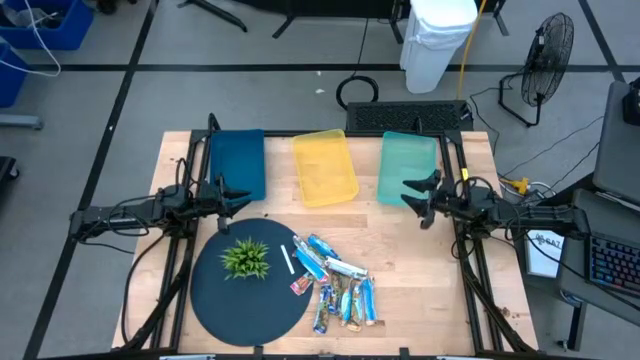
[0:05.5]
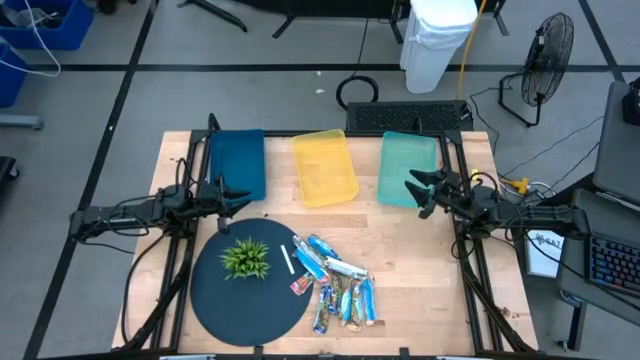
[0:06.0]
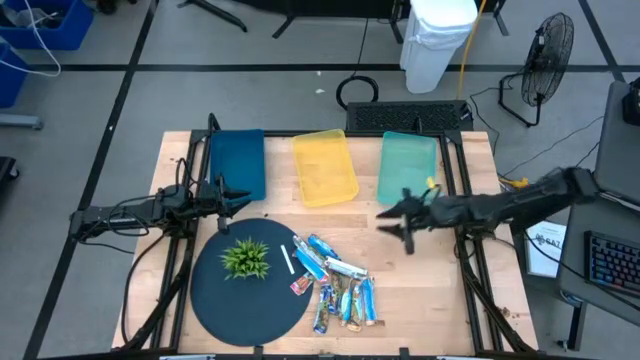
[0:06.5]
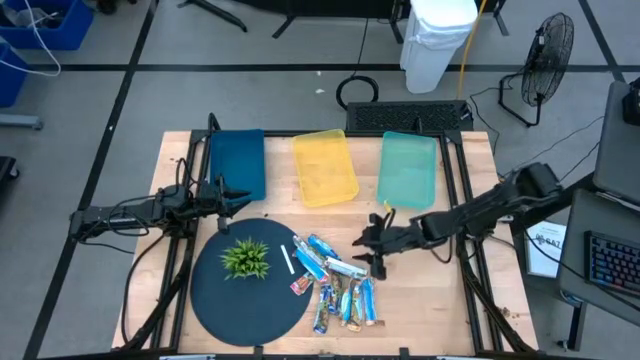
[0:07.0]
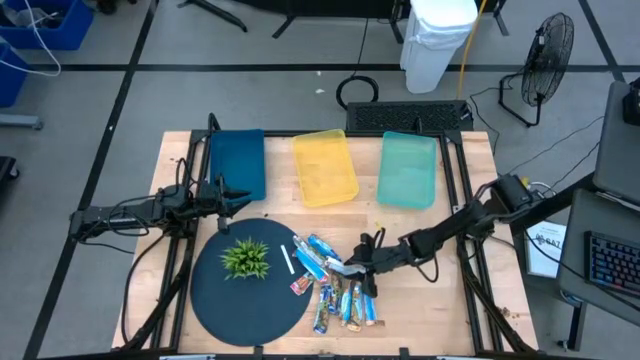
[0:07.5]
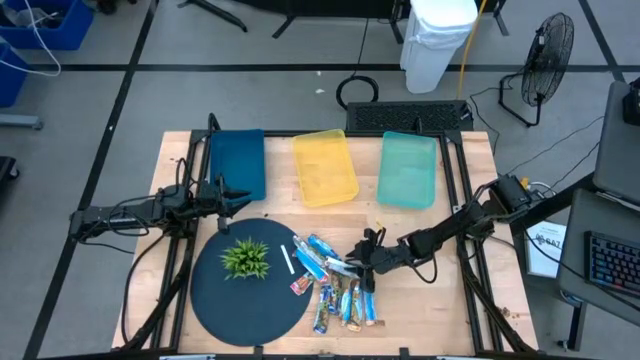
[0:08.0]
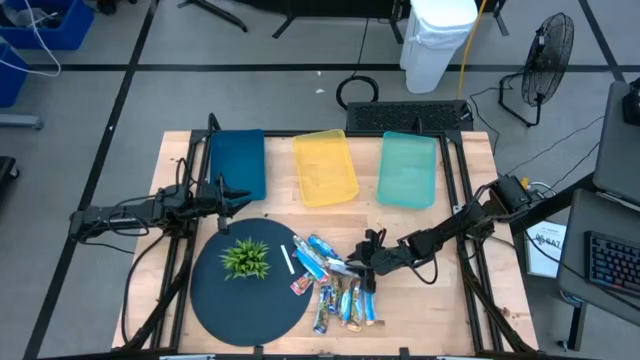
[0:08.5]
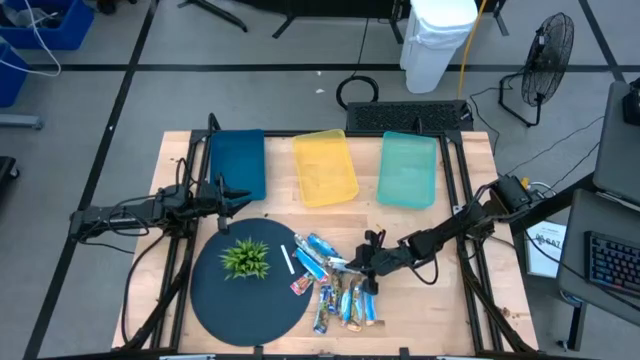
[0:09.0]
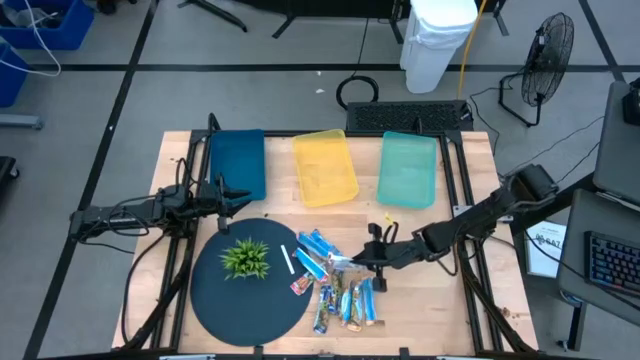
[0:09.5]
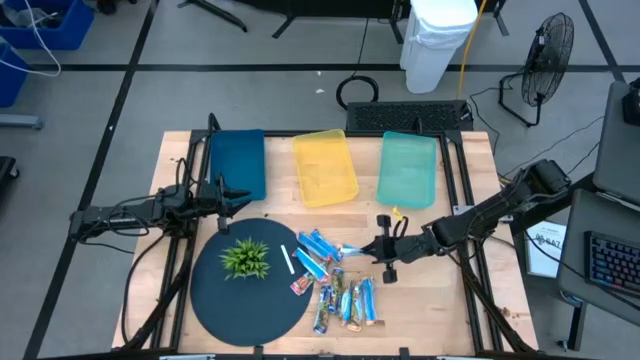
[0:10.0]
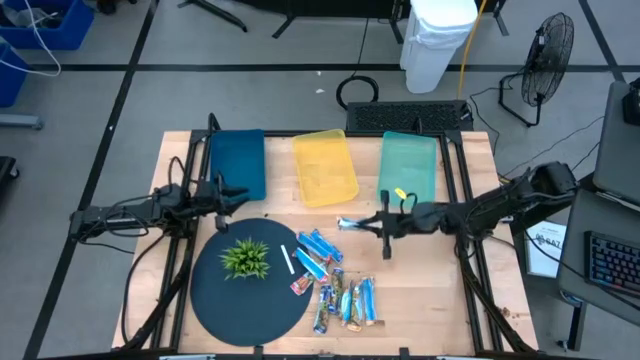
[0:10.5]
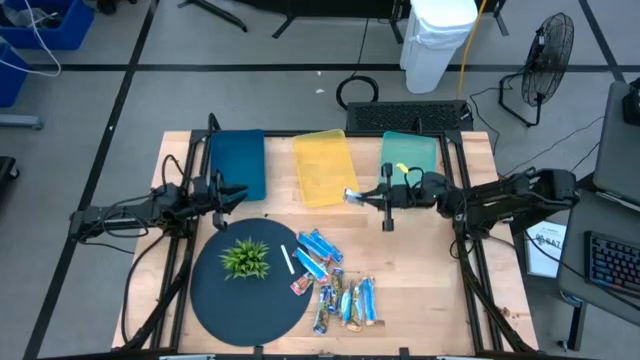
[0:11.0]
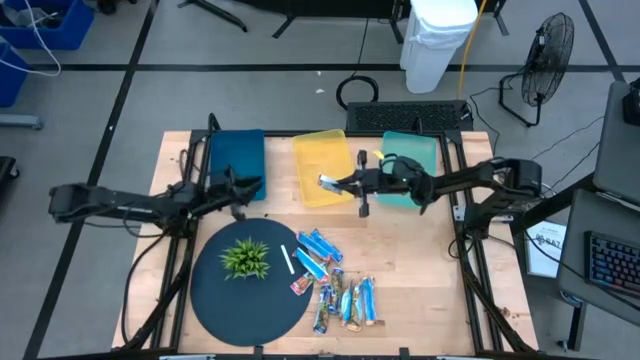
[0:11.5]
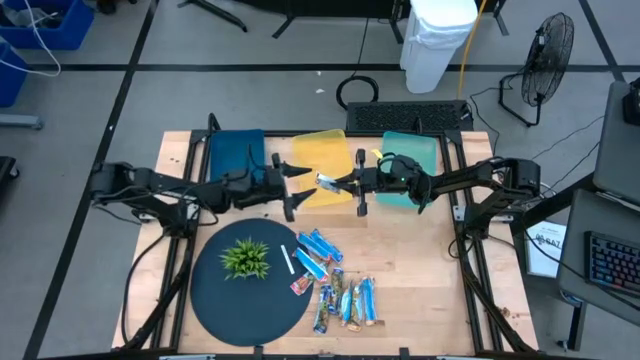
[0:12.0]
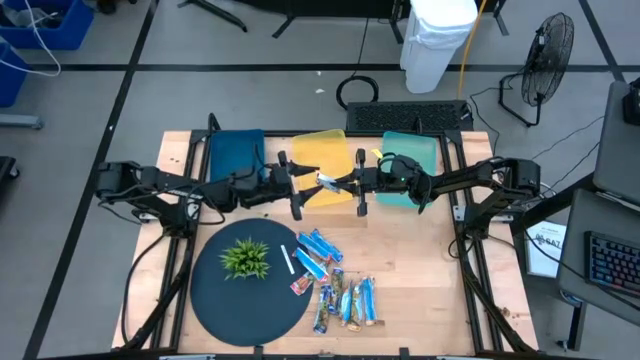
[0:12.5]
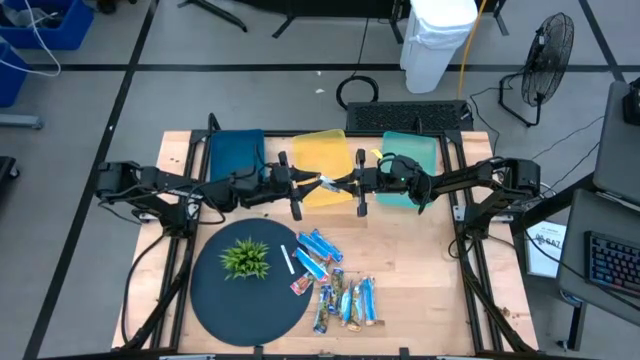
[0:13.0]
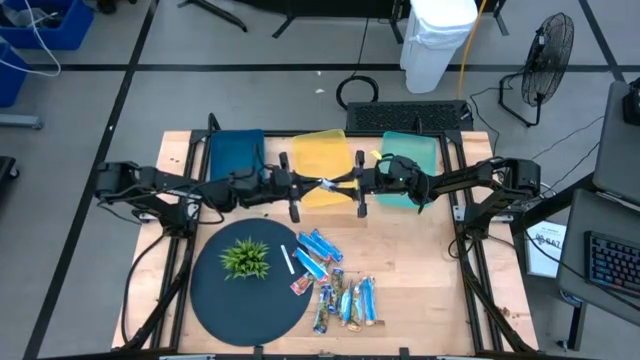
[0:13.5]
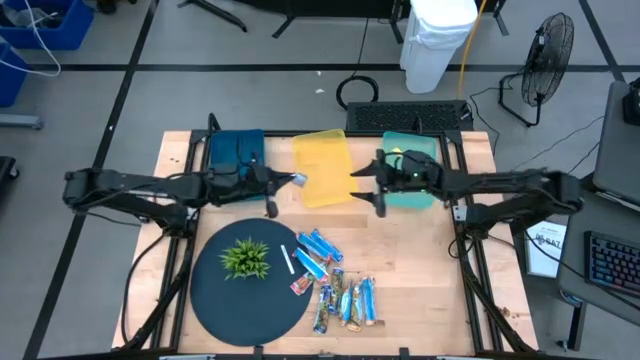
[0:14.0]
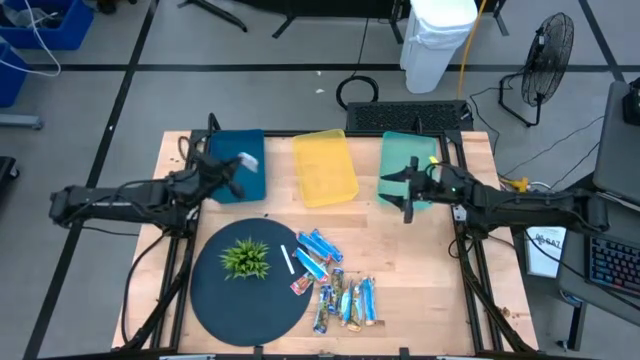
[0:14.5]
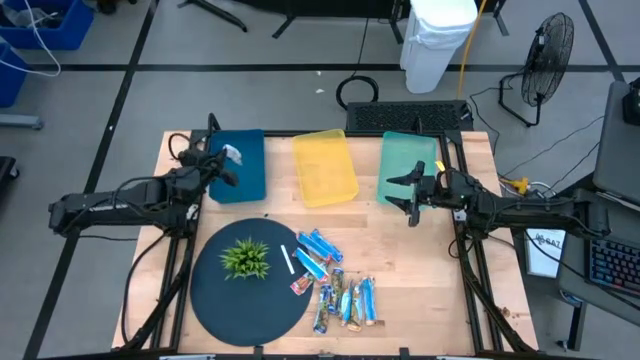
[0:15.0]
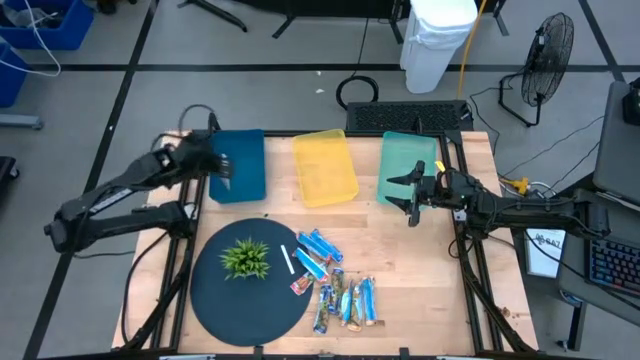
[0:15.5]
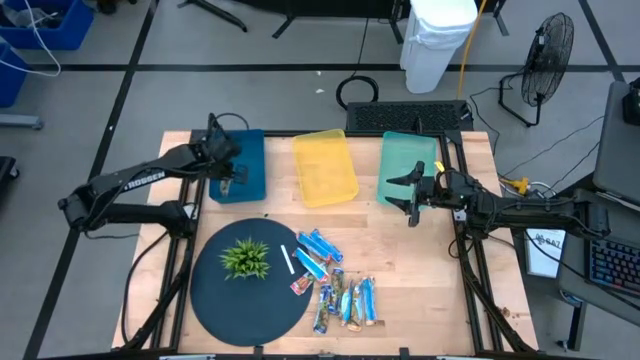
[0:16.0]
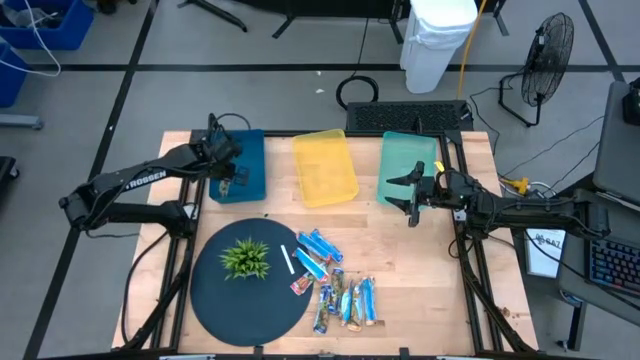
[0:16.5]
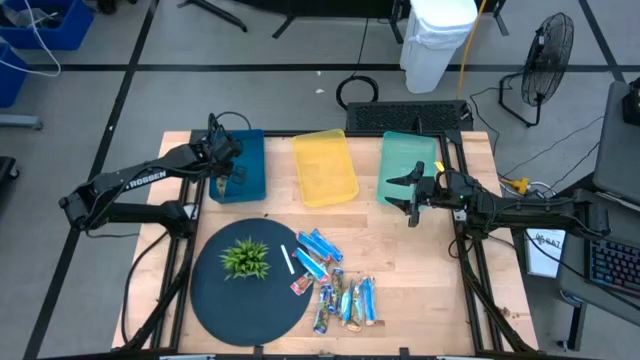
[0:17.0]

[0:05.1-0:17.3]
Task: Pick and place Granola Bars by type
Put the yellow granola bar into the blue bin

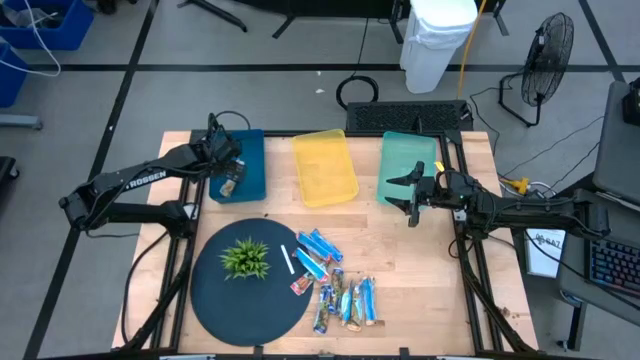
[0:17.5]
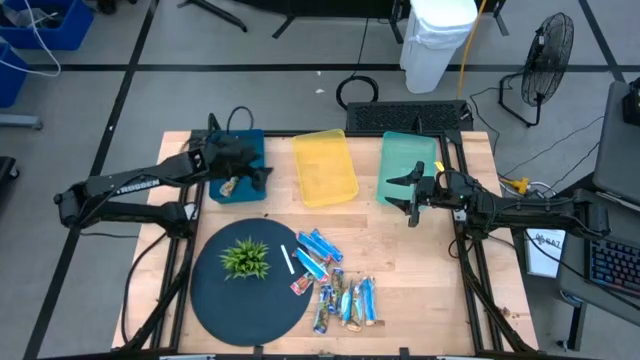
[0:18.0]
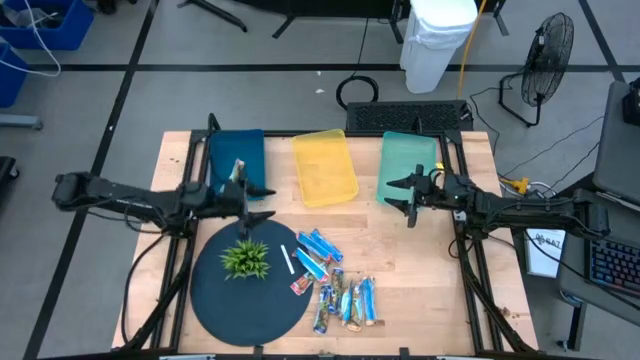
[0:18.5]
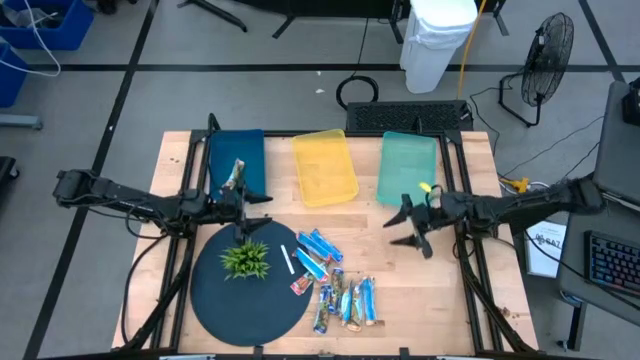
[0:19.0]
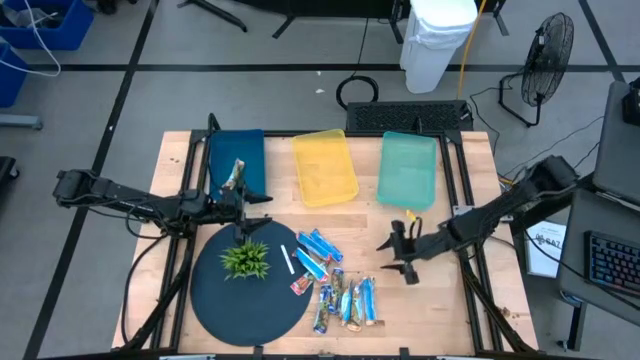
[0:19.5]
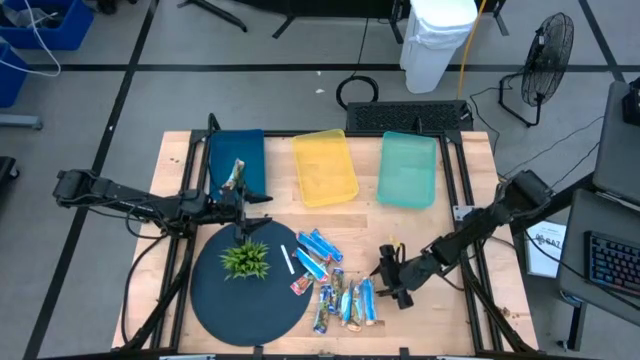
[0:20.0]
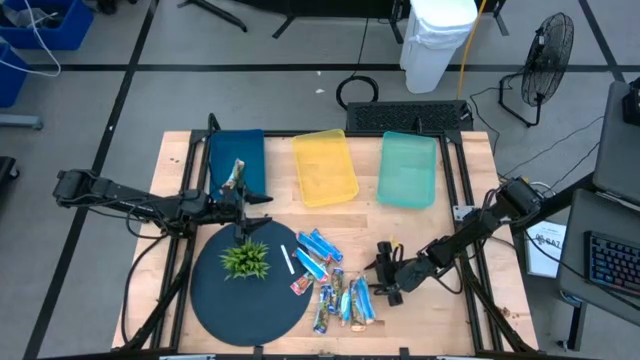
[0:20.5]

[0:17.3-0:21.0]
Put the yellow granola bar into the blue bin

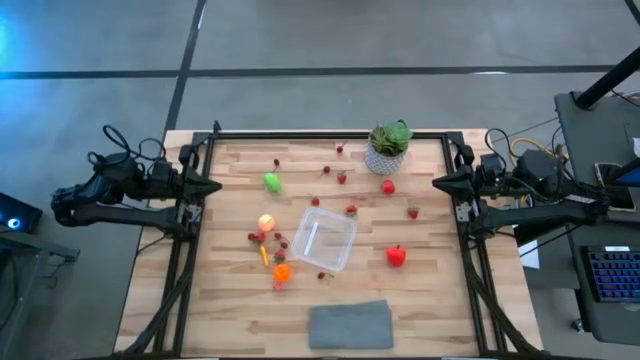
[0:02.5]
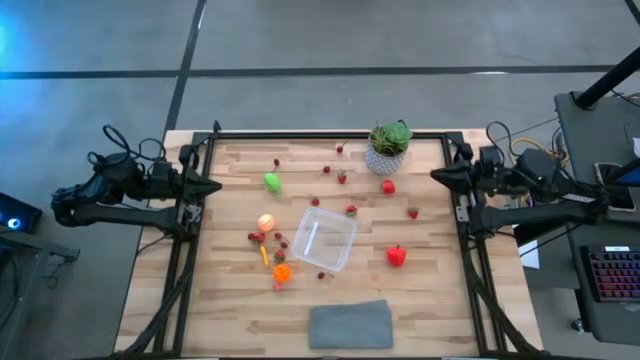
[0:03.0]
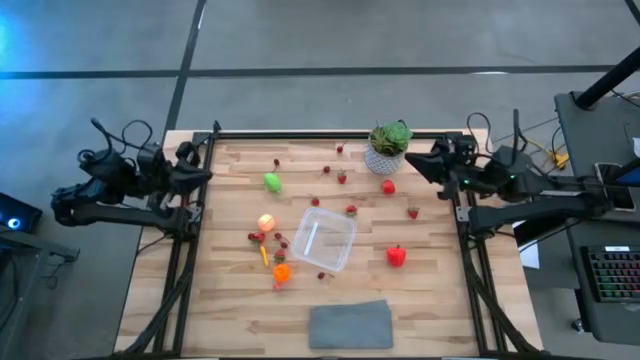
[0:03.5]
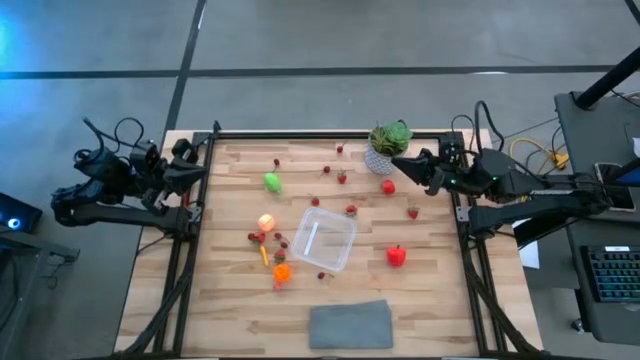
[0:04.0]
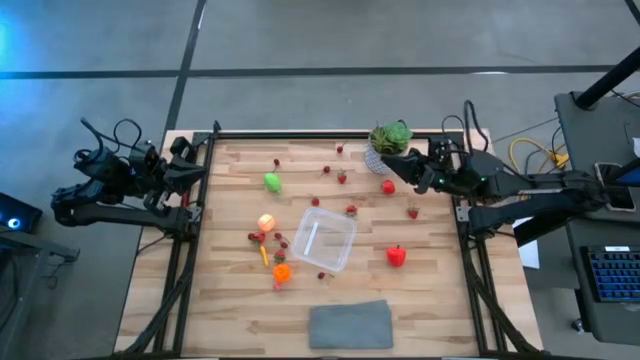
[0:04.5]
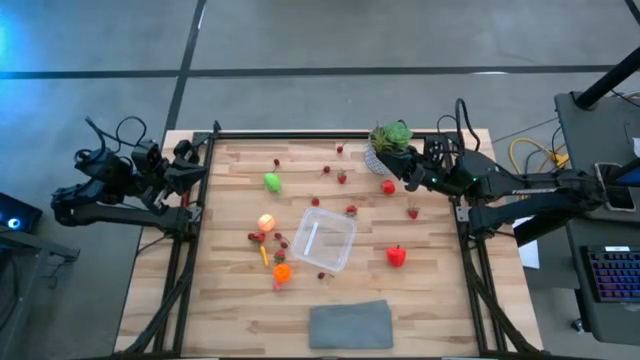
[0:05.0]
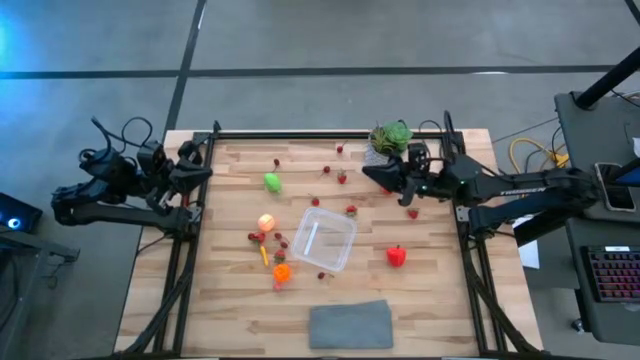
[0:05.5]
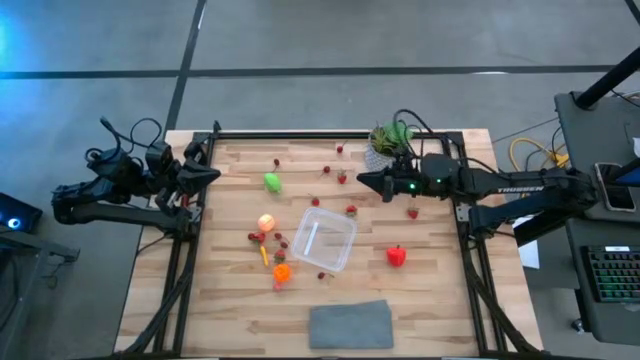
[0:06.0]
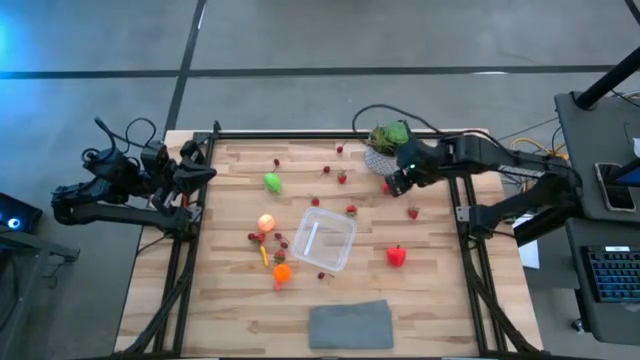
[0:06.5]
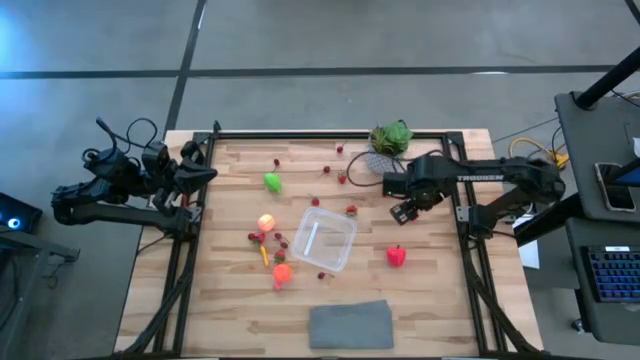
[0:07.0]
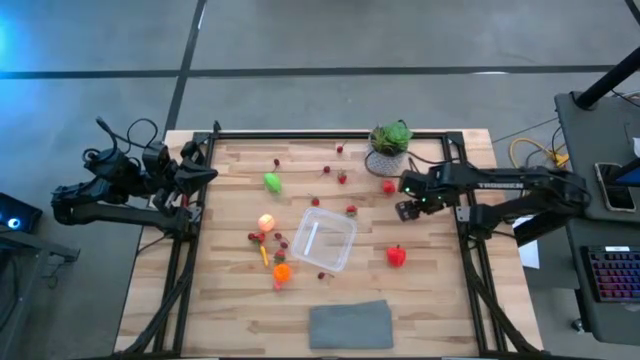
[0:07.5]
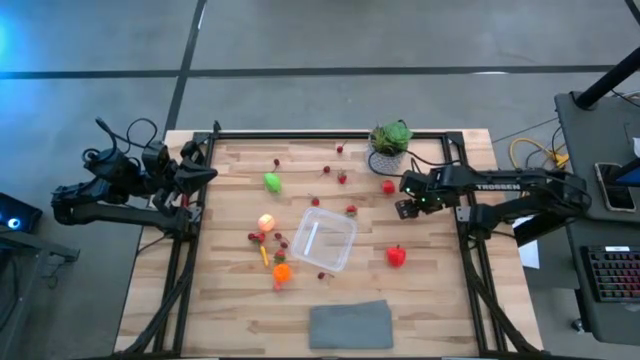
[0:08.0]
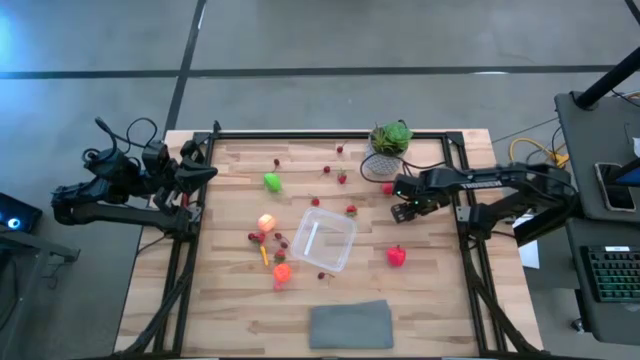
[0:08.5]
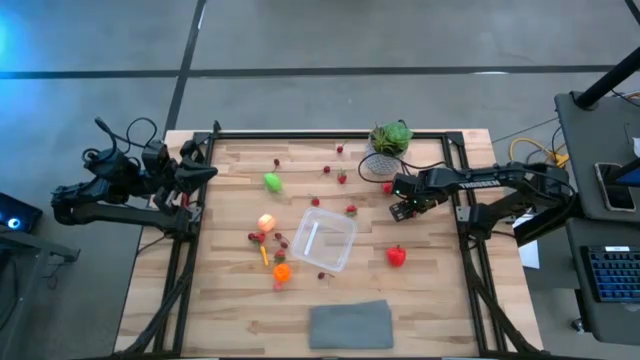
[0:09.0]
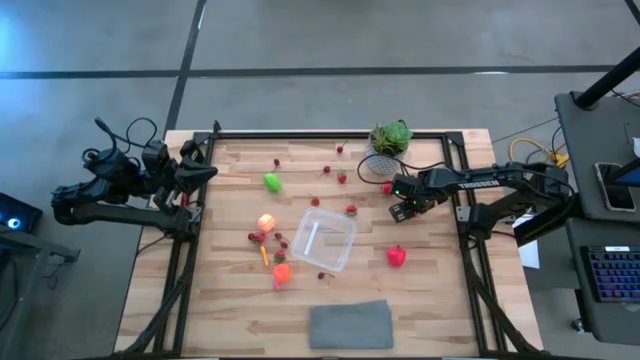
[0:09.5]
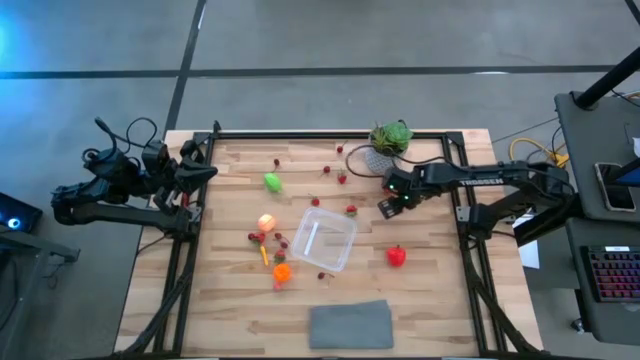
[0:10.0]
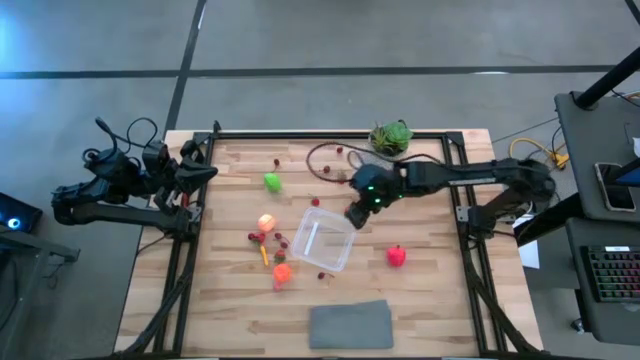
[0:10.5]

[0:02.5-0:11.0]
Task: Pick and placing Produce into tupperware
Put the red strawberry into the transparent container
